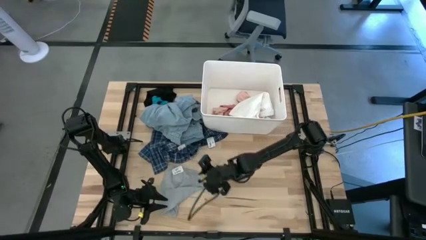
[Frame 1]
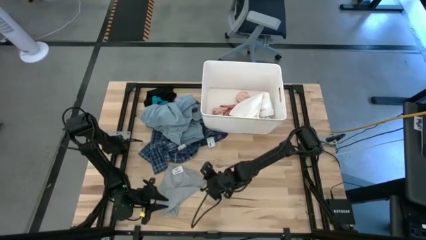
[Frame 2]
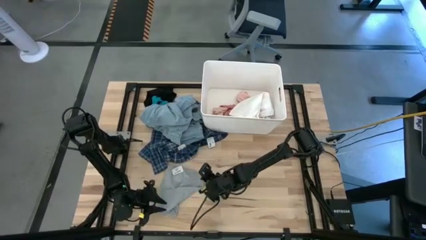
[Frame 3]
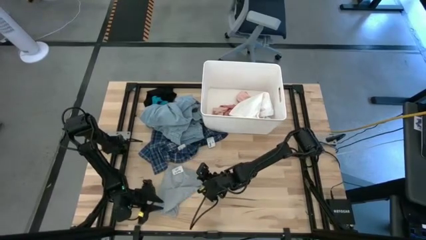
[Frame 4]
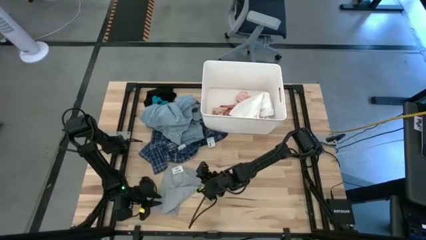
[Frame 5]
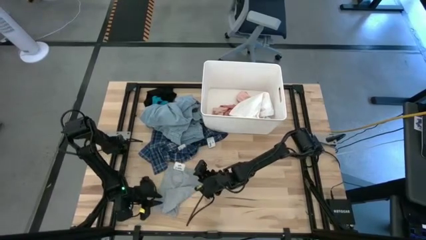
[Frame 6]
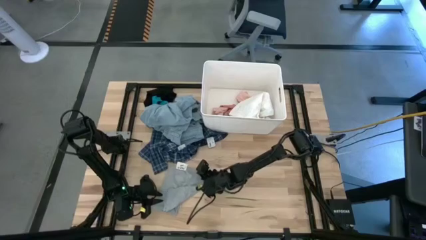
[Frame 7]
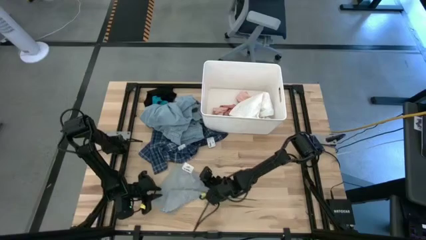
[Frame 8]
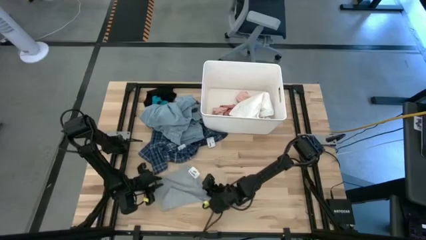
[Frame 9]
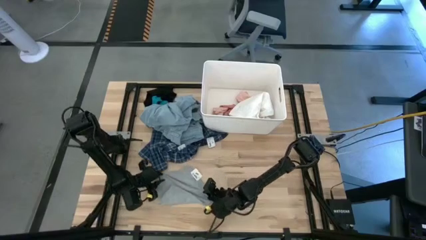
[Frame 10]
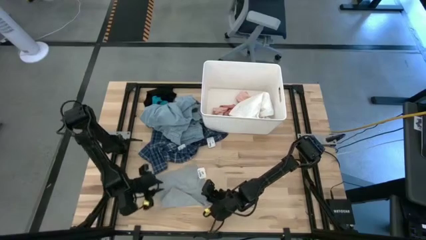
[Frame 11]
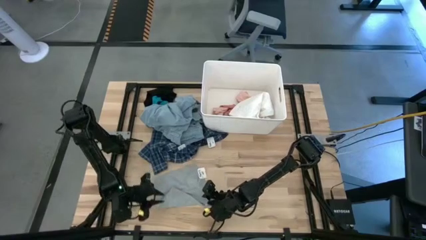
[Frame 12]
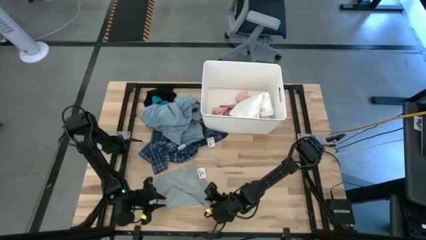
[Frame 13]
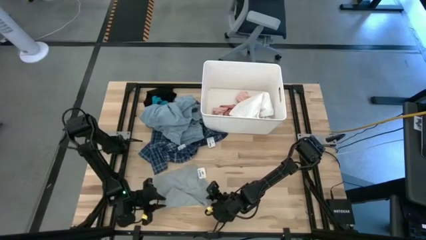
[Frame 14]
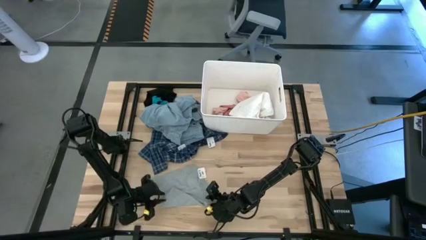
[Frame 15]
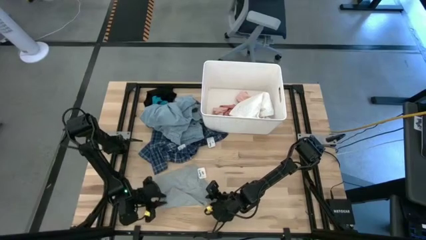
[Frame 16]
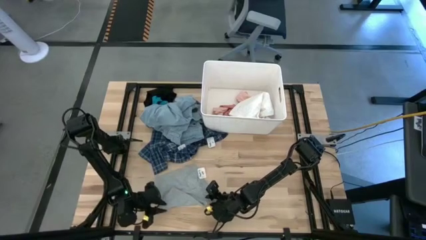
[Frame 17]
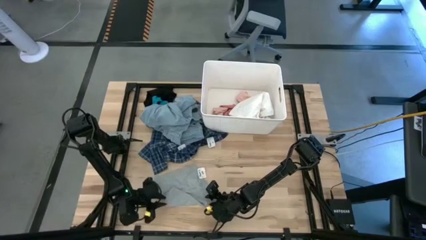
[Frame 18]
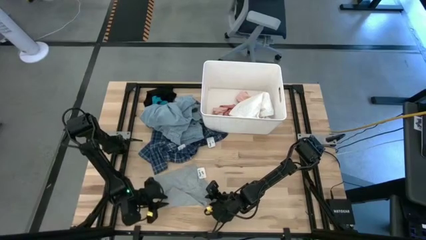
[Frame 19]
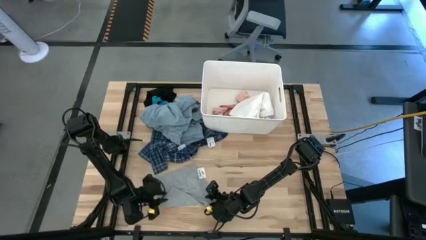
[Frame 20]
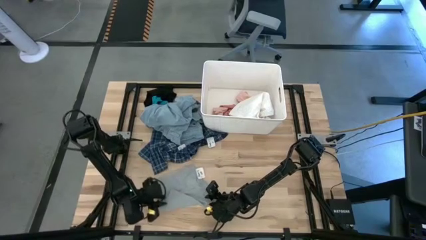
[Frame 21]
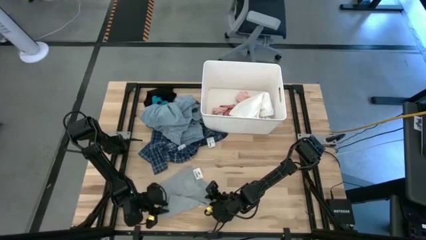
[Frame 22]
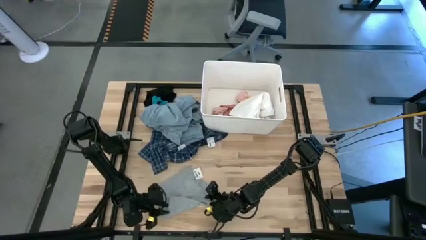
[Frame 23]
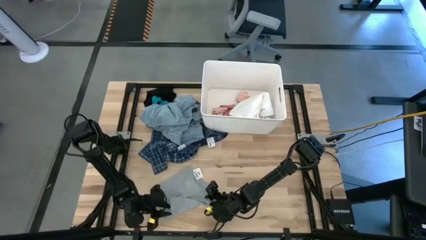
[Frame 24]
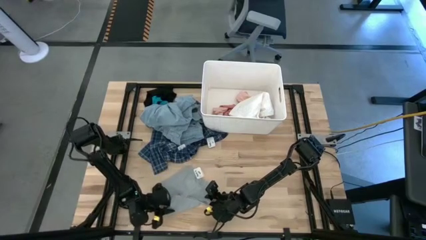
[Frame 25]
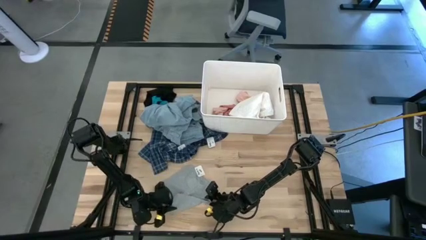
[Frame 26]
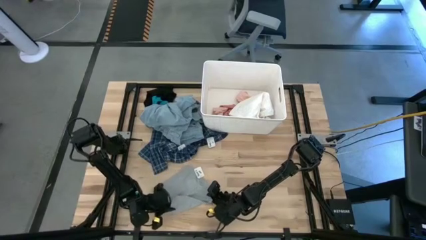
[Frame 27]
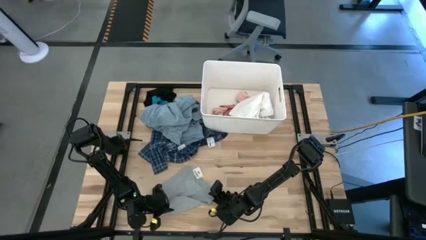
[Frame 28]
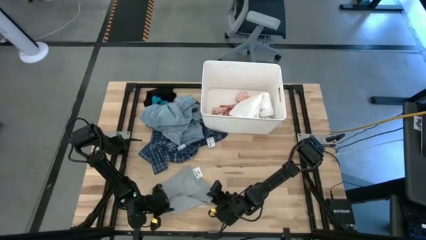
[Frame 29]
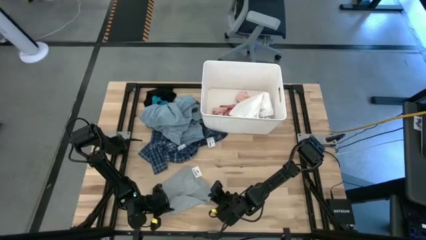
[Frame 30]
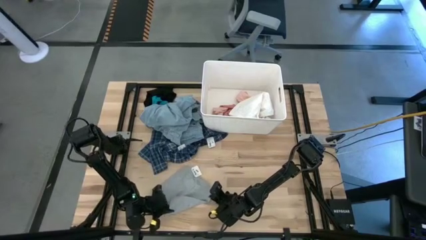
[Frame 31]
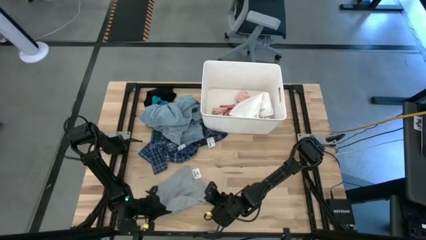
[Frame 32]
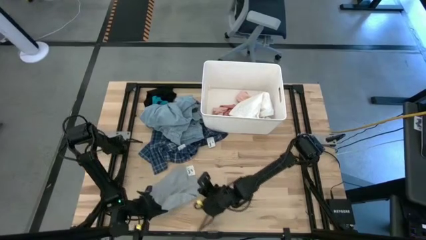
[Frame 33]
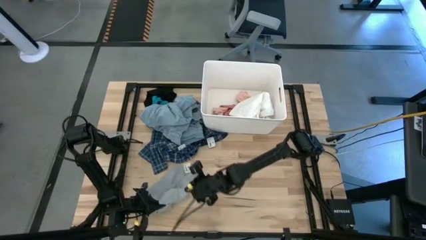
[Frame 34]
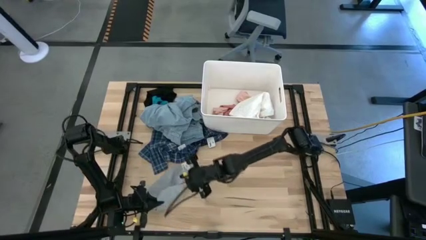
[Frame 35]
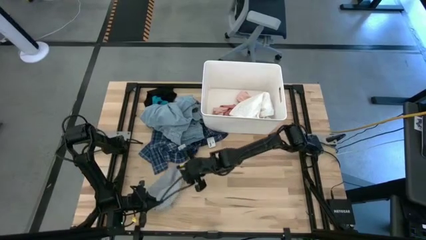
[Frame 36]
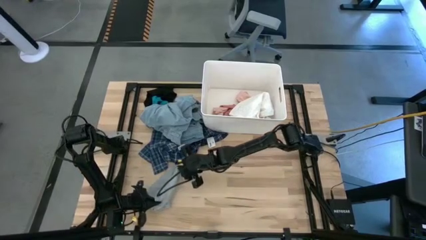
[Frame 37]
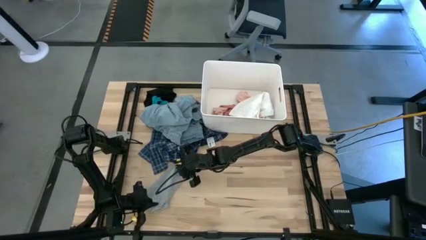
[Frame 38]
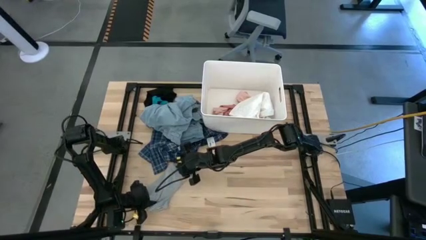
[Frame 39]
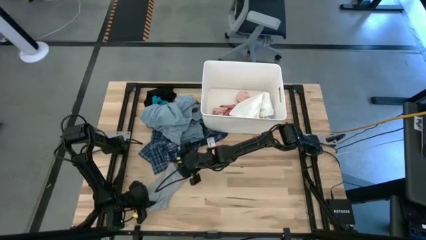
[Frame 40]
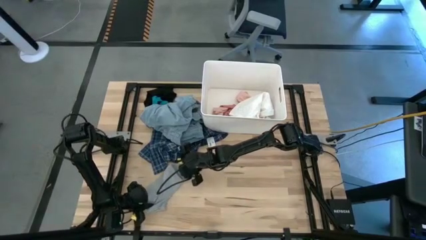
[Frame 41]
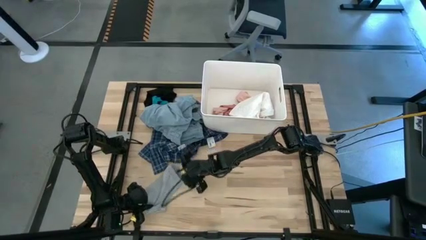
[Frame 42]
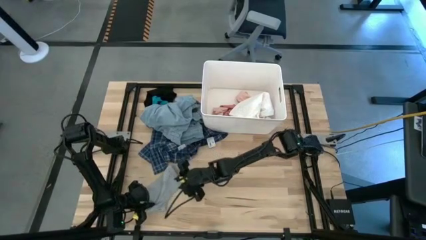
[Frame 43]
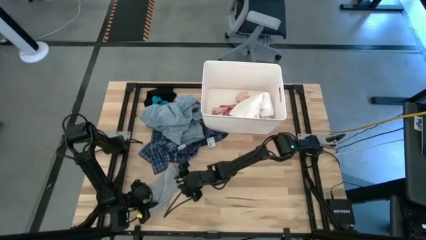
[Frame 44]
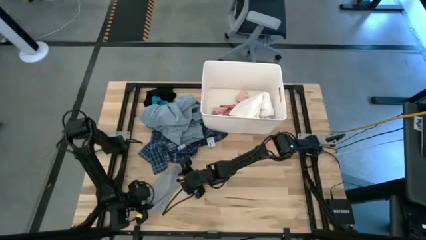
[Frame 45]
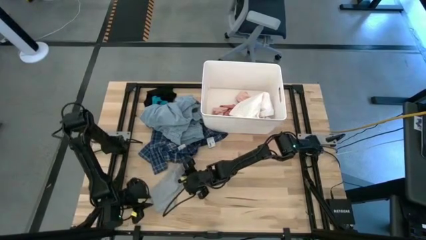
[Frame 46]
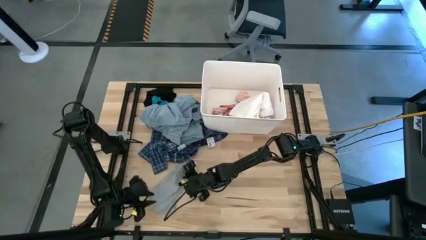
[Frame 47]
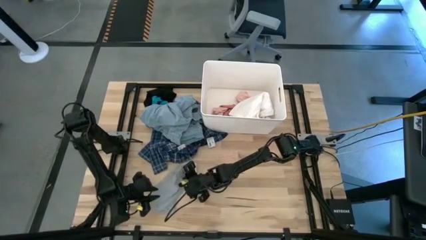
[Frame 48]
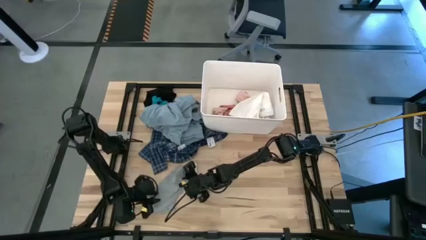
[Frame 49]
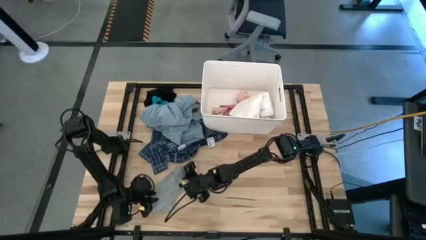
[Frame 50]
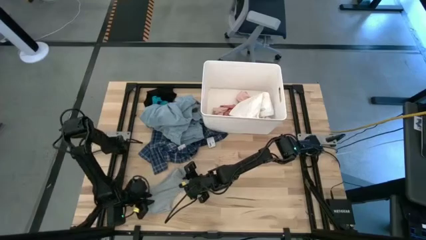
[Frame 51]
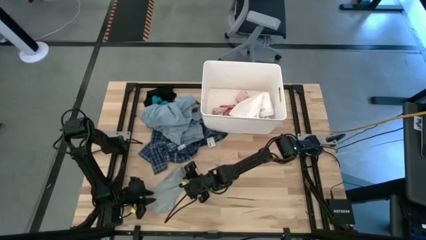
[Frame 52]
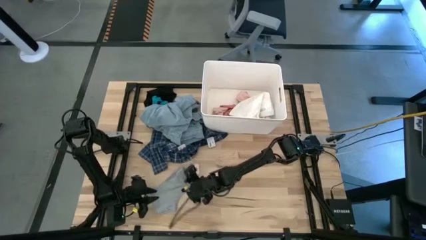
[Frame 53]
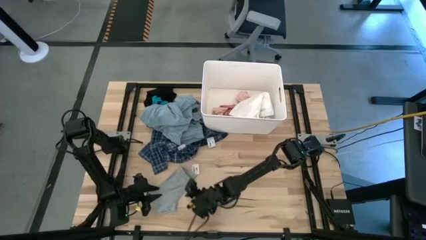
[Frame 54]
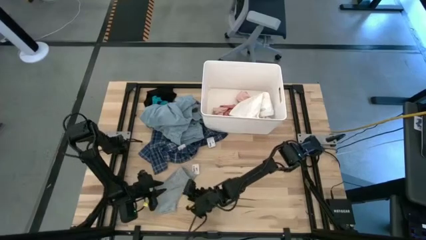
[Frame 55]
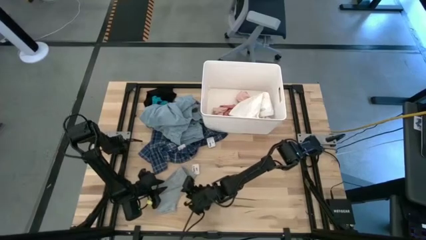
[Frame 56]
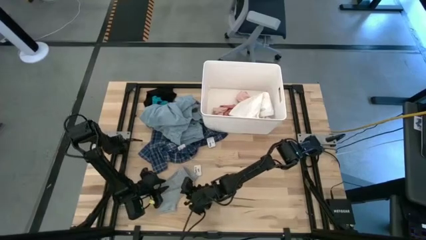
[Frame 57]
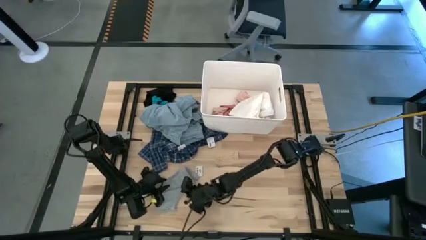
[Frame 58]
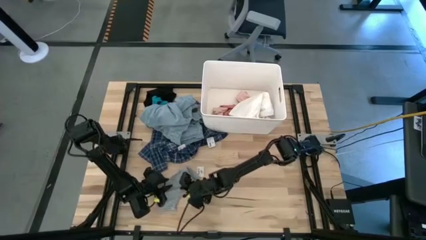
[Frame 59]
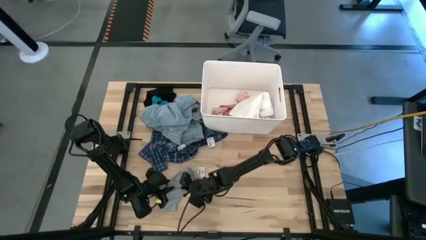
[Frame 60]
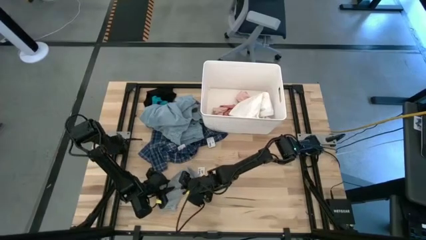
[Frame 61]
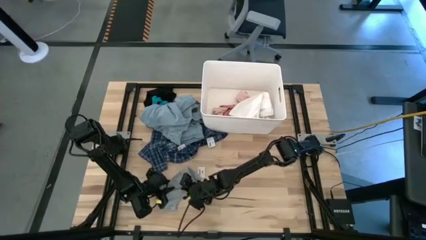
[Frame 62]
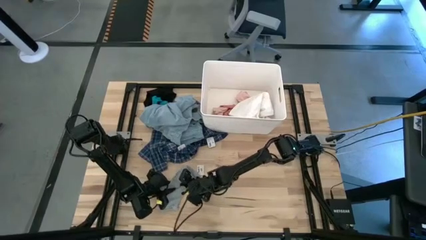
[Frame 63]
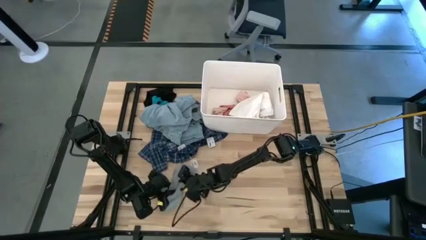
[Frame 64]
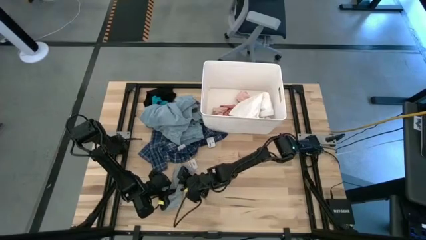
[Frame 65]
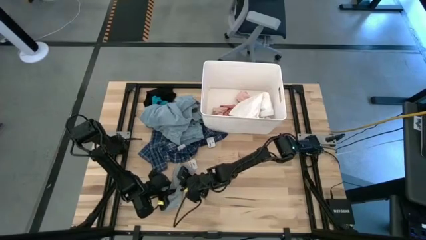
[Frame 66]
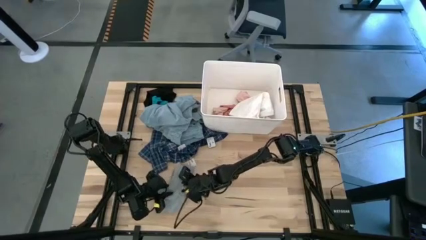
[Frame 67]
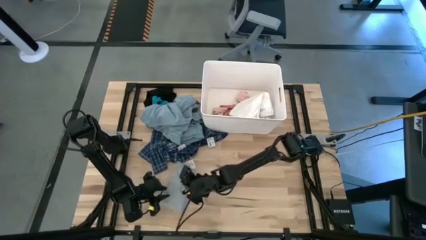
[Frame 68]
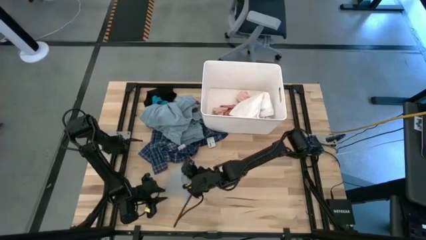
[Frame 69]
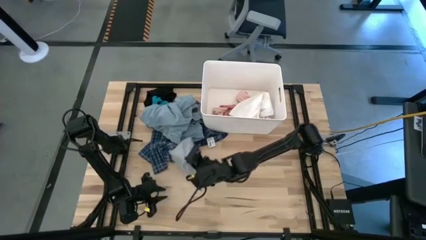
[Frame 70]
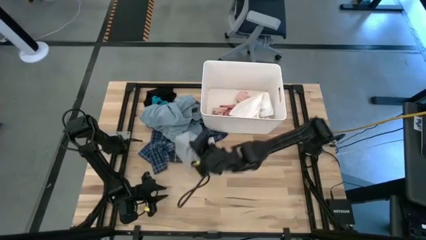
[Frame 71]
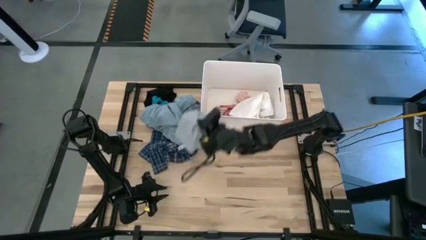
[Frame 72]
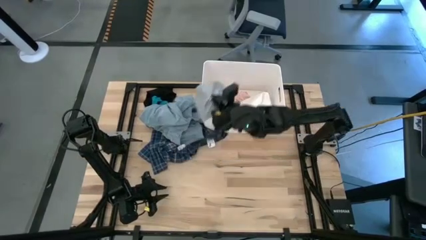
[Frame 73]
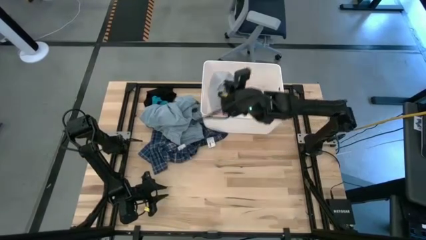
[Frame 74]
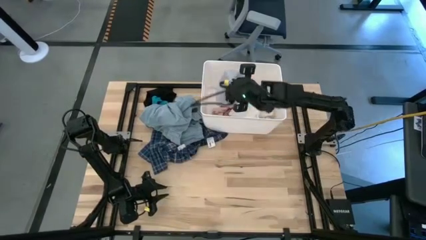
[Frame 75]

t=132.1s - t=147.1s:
Task: Sort clothes
Put the gray boxer into the white laundry bin
